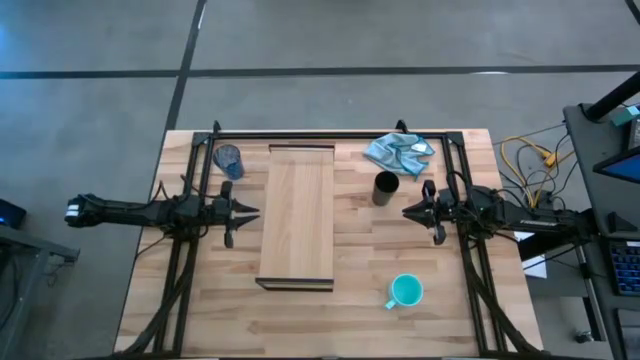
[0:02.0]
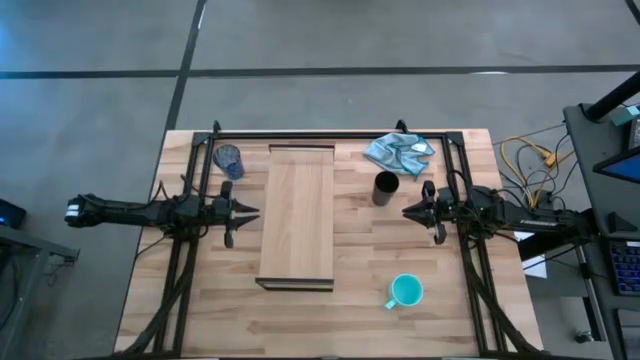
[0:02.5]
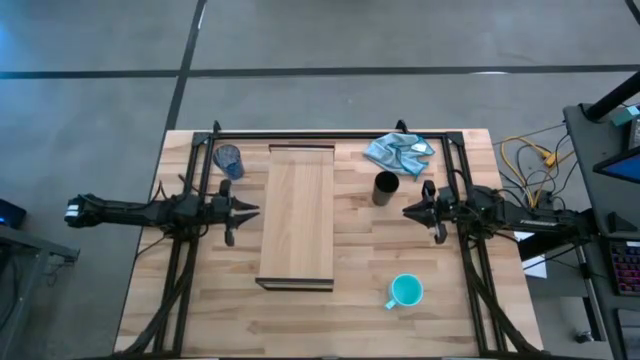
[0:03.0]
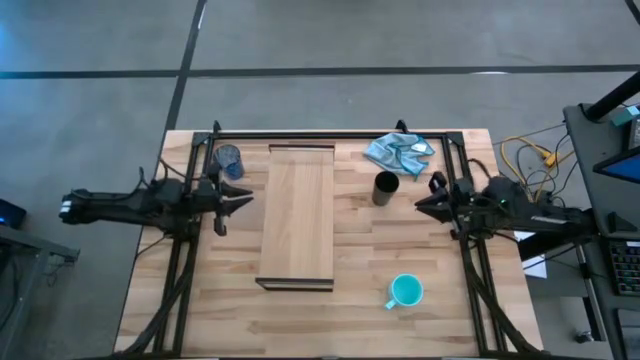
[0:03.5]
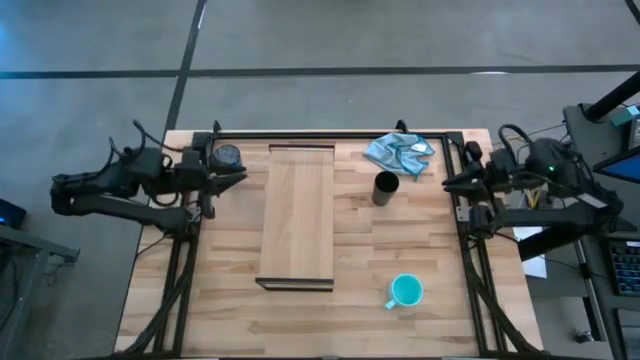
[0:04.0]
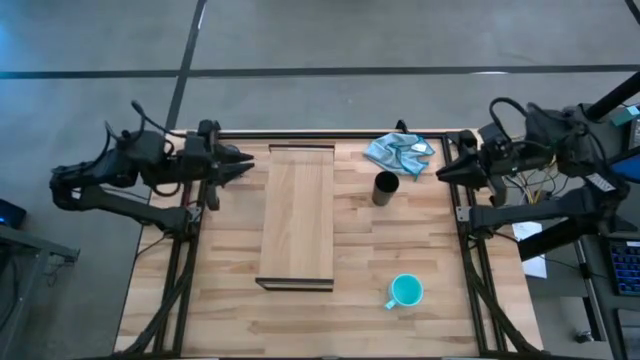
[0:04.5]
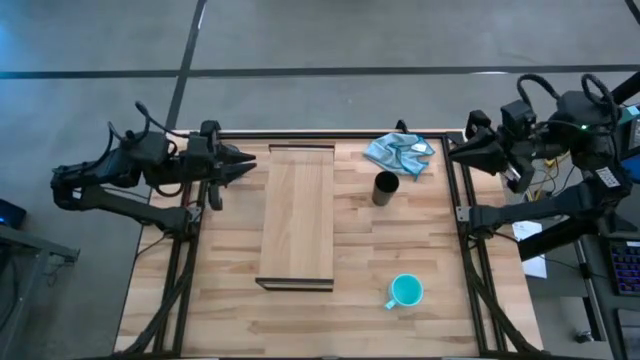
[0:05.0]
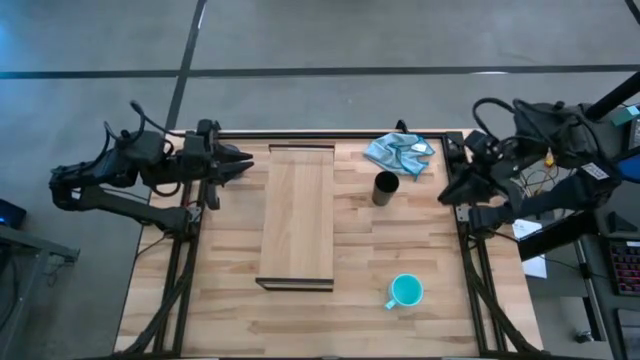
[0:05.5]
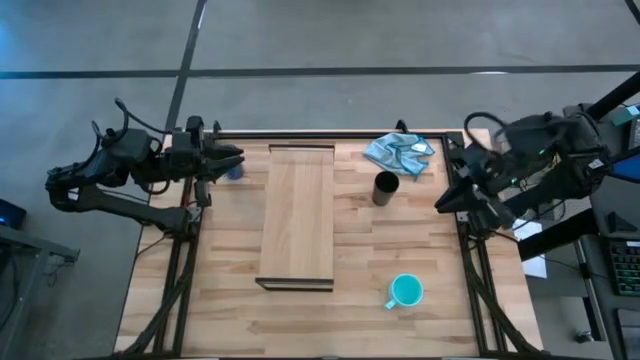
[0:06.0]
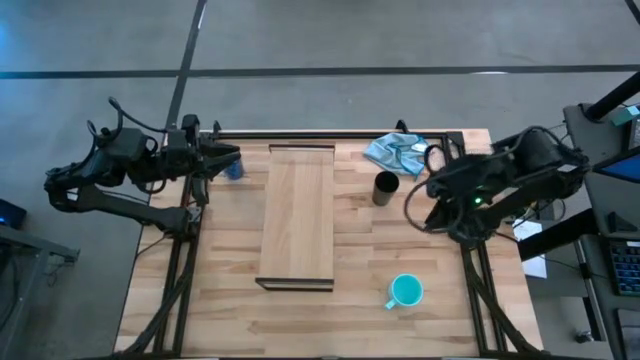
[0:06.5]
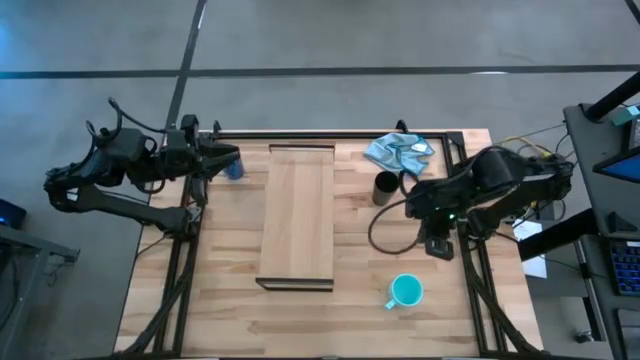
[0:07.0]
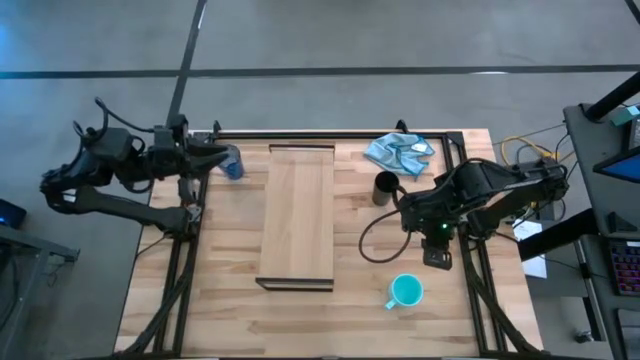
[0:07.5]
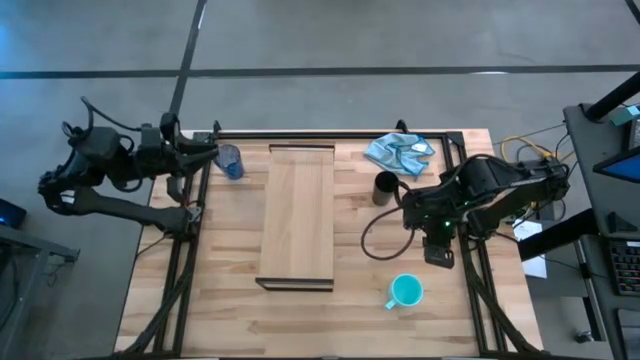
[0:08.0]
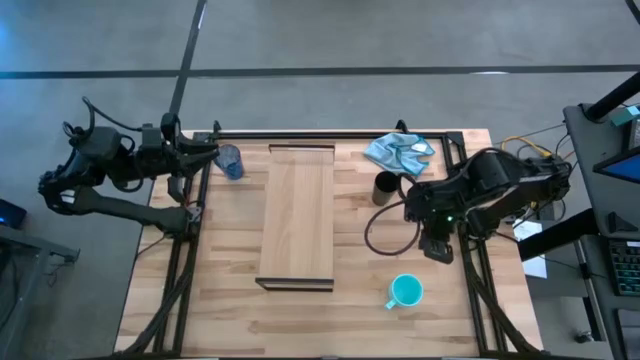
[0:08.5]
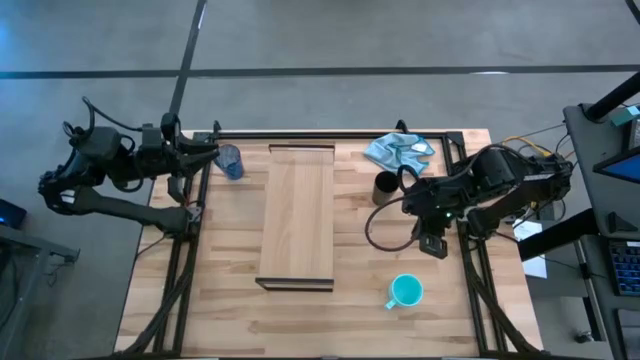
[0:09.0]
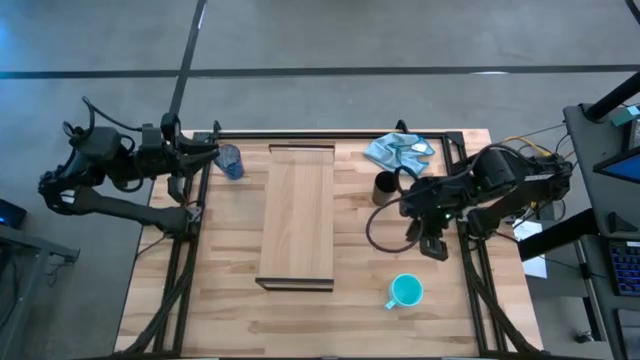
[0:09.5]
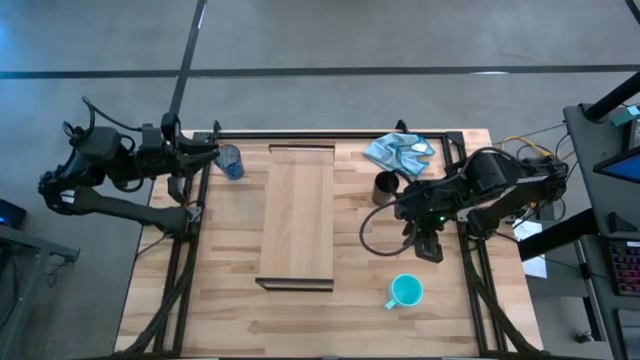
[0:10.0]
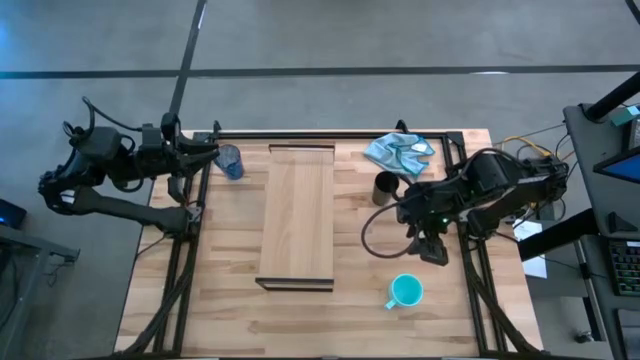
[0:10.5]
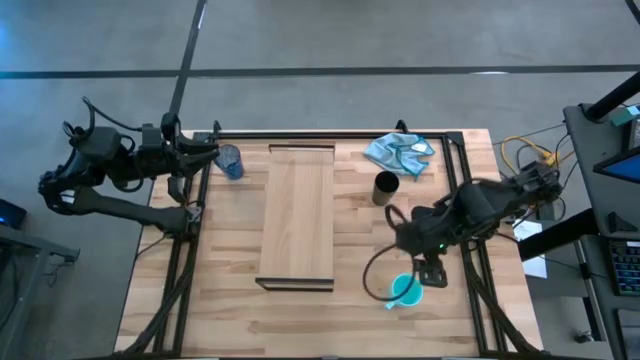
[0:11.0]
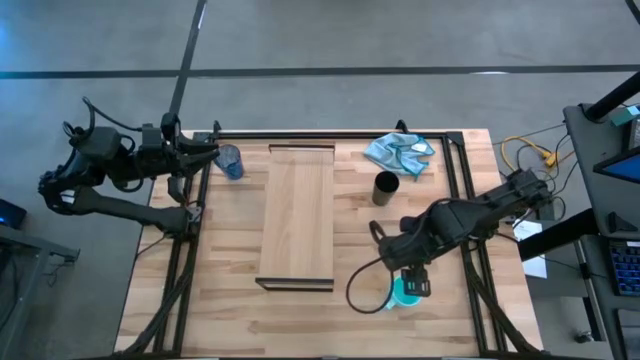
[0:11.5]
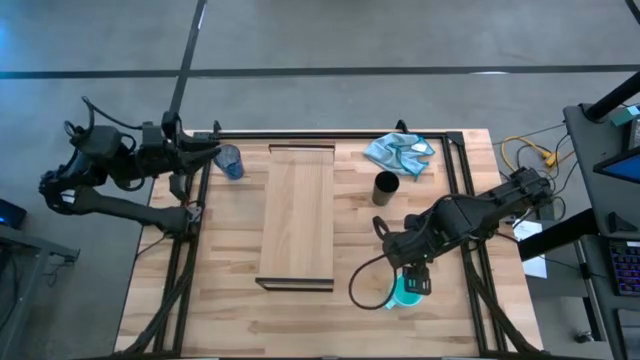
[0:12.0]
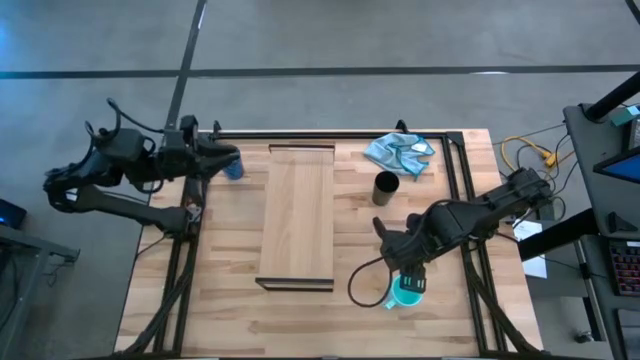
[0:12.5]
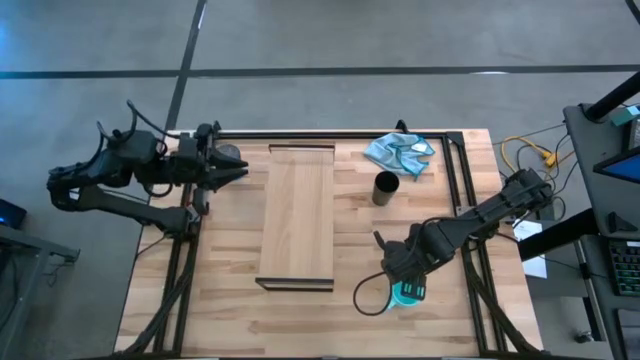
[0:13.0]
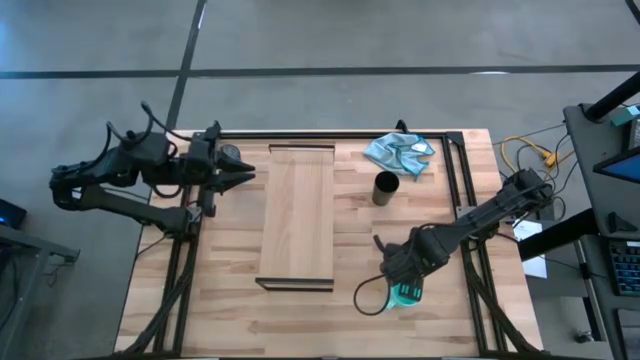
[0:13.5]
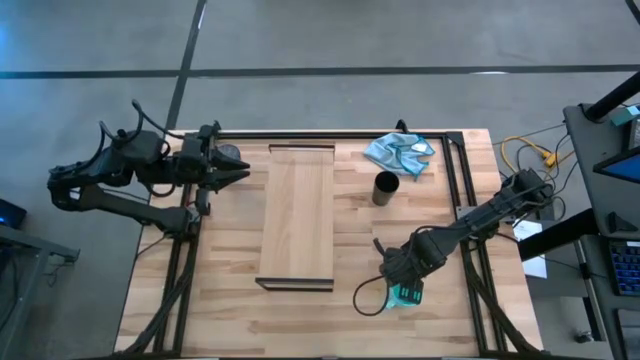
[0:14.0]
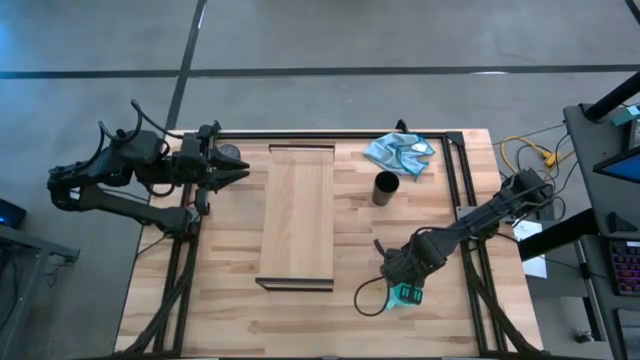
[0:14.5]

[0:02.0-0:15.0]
Task: Stack small to large cups/mugs on shelf
Put the blue mug on the shelf

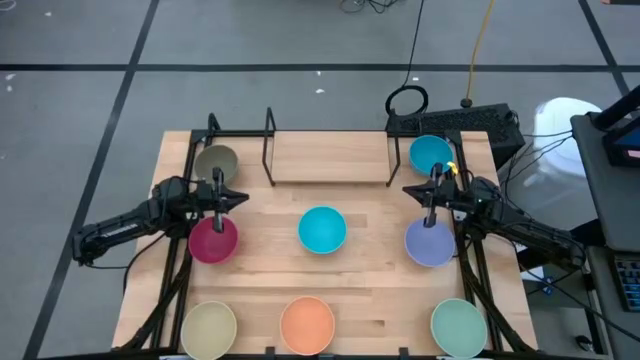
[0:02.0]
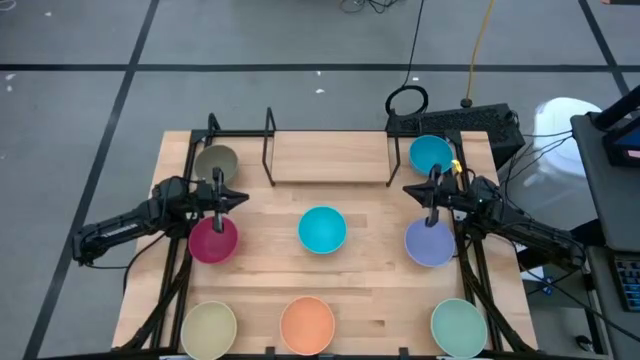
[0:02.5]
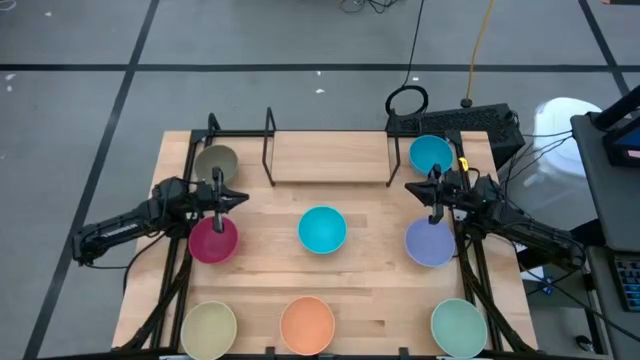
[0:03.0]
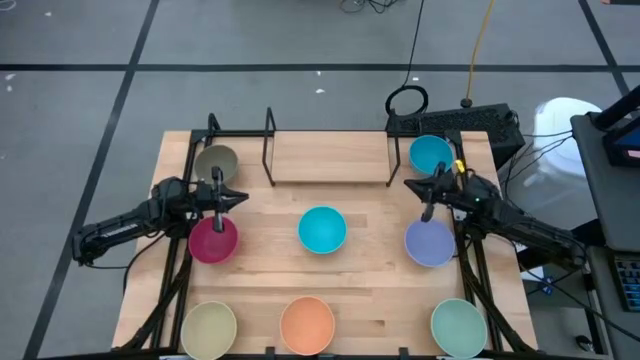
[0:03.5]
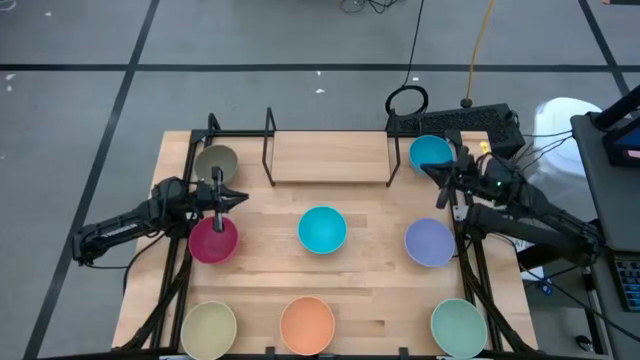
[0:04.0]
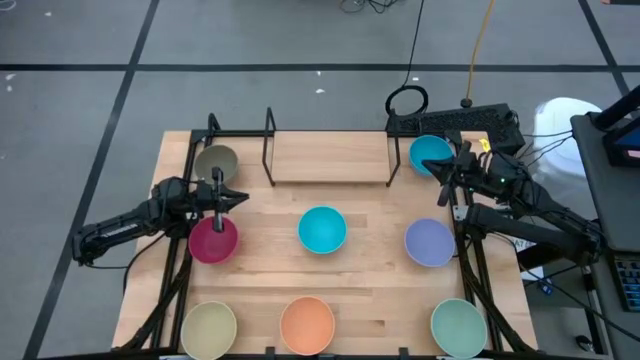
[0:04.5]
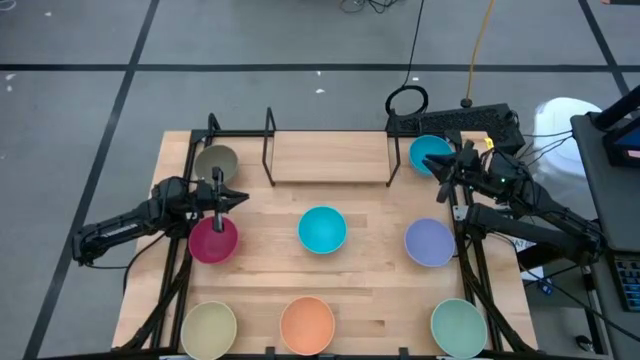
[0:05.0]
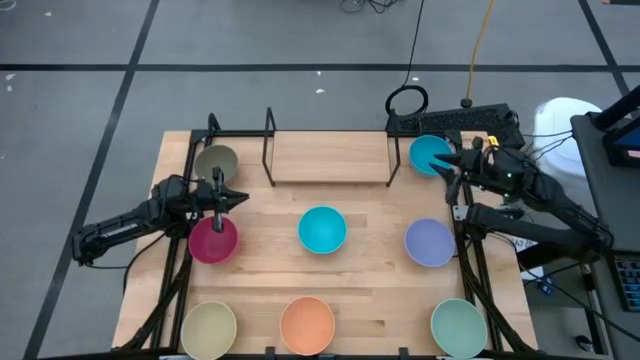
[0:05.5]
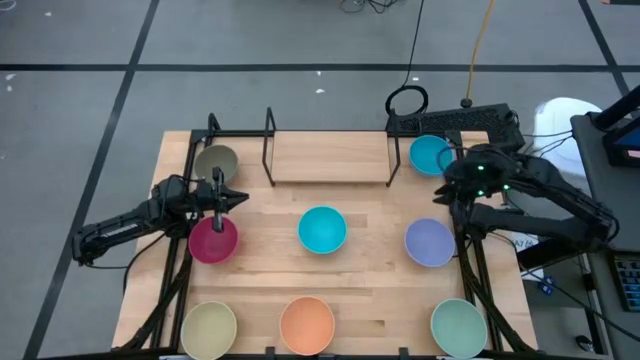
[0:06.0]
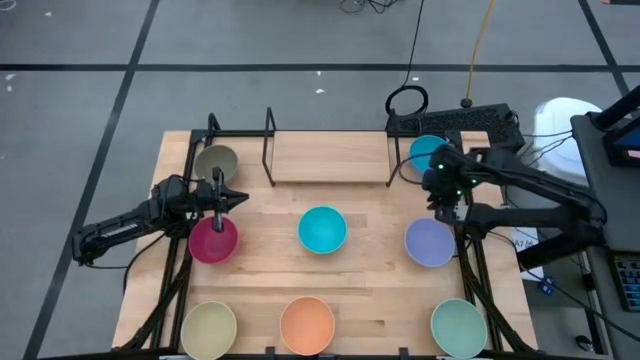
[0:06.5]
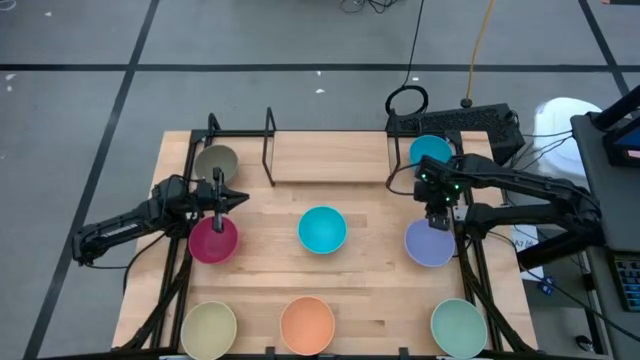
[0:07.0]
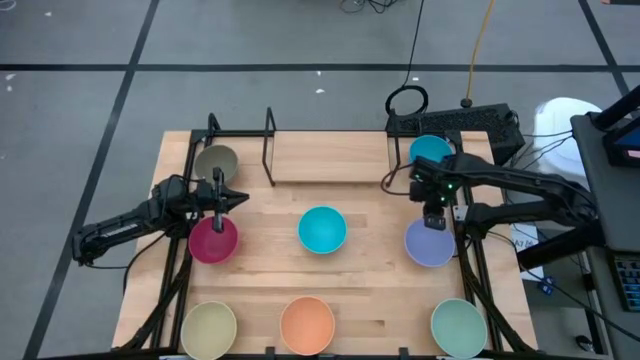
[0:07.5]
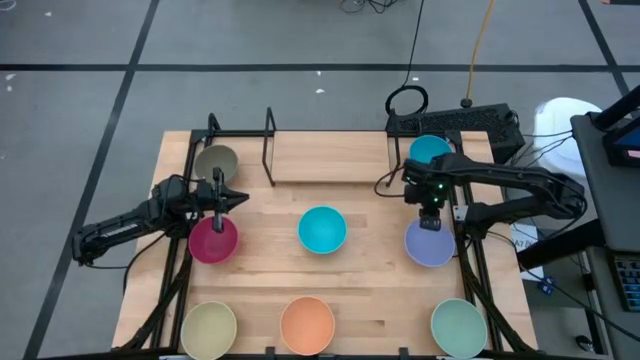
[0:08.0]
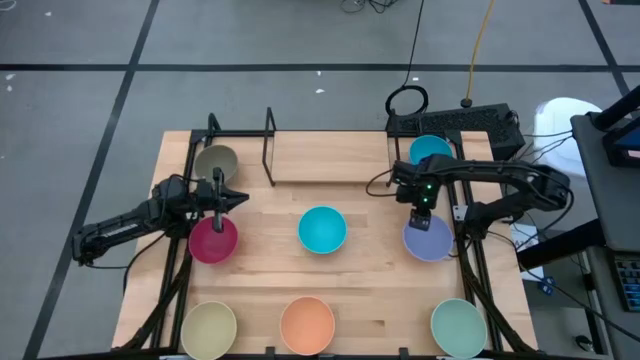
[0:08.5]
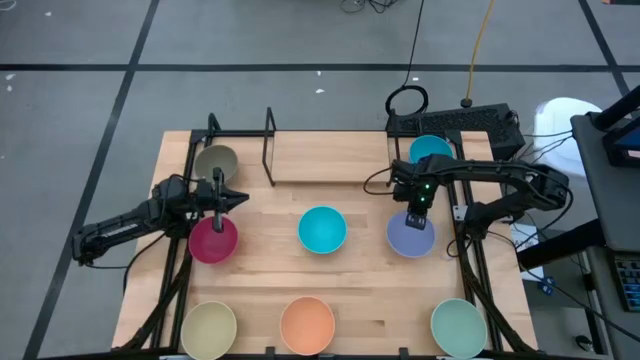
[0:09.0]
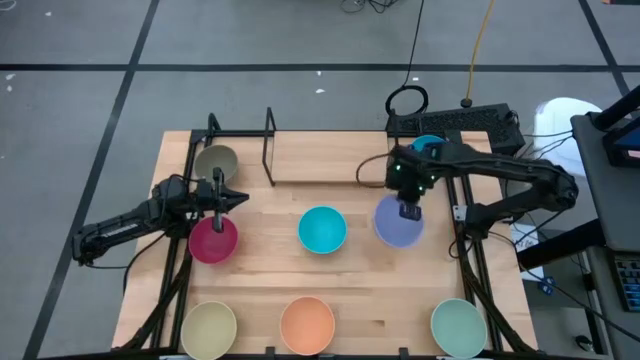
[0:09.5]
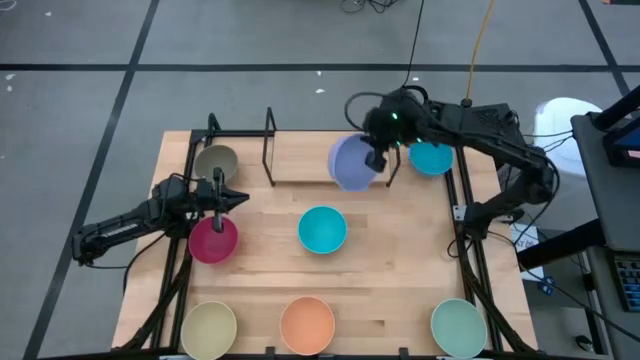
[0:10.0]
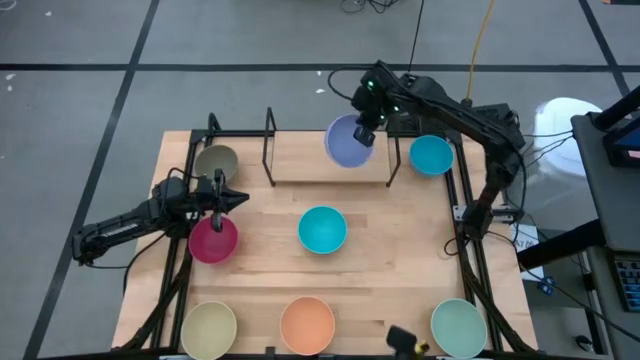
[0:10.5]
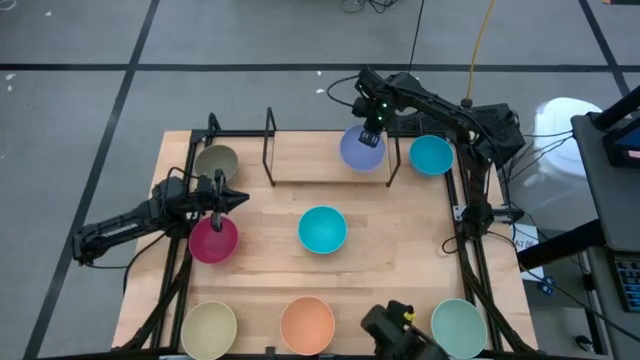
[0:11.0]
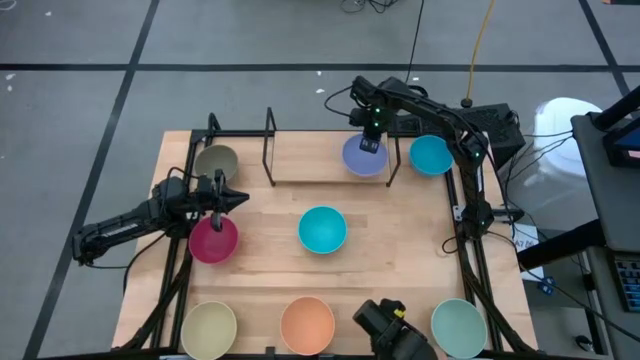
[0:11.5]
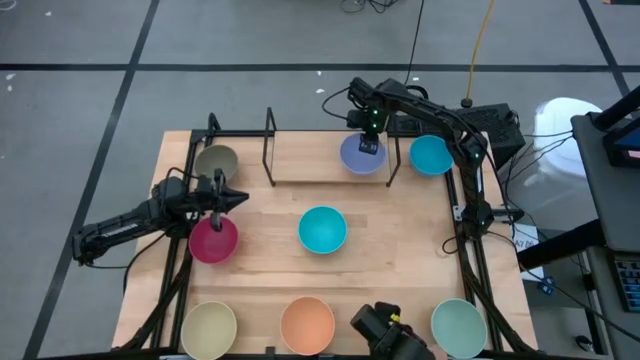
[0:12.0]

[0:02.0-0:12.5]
Task: Place and stack bowls onto a shelf
Put the purple bowl on the shelf
